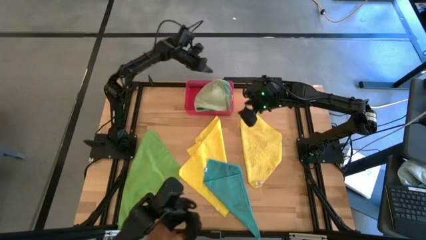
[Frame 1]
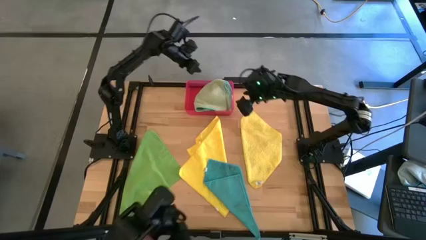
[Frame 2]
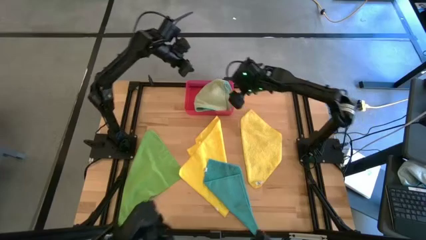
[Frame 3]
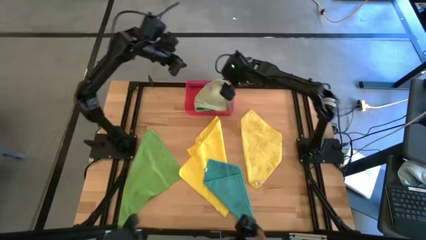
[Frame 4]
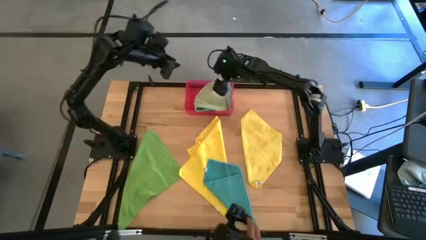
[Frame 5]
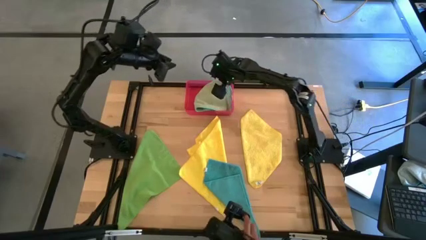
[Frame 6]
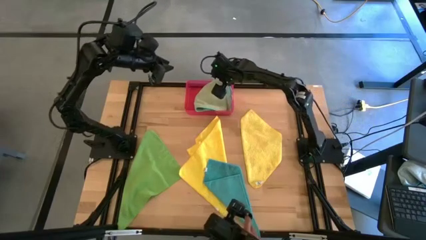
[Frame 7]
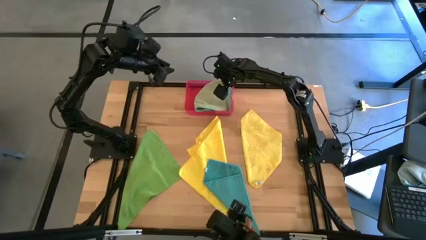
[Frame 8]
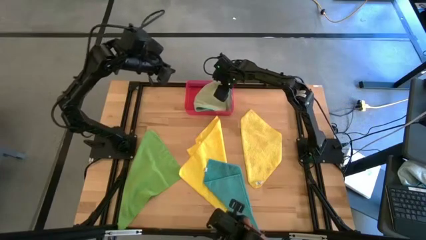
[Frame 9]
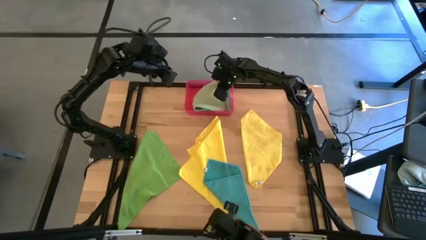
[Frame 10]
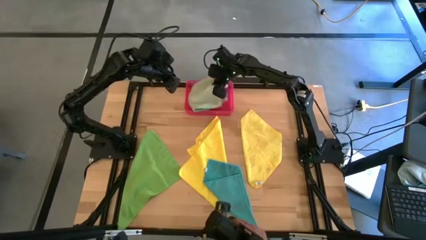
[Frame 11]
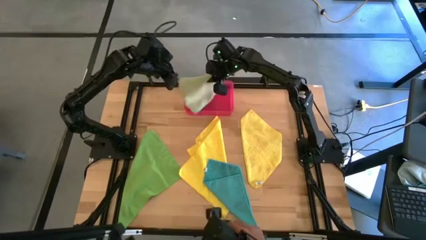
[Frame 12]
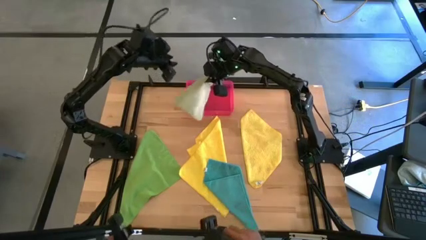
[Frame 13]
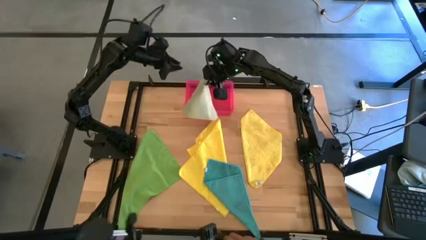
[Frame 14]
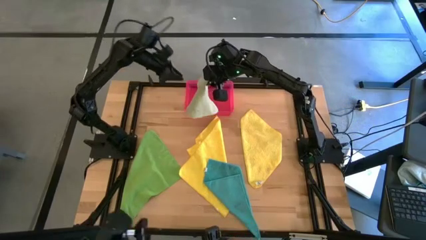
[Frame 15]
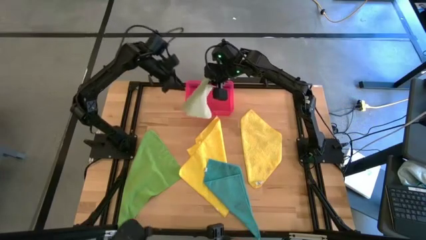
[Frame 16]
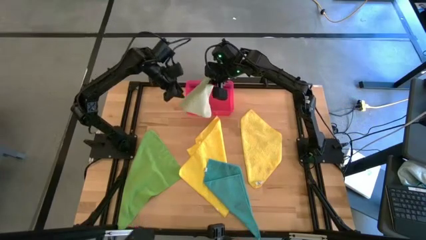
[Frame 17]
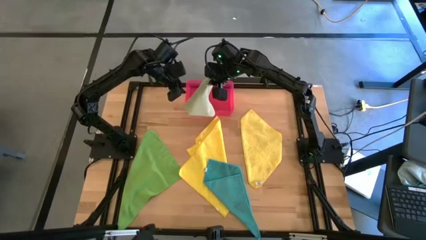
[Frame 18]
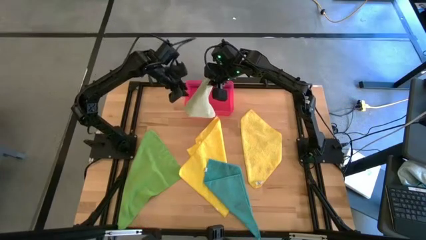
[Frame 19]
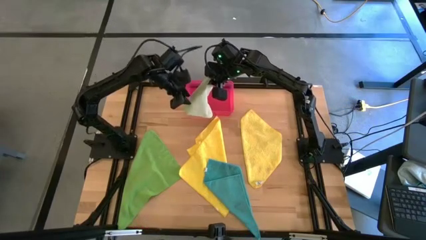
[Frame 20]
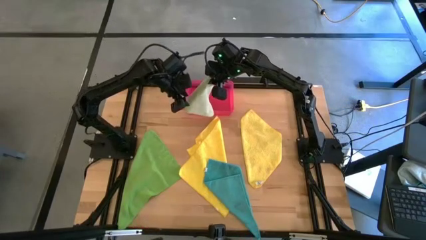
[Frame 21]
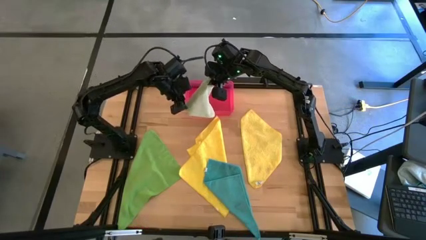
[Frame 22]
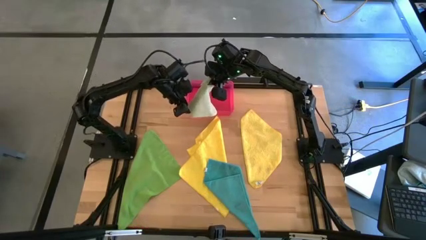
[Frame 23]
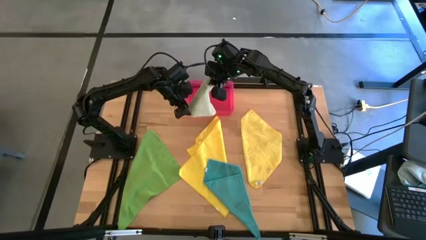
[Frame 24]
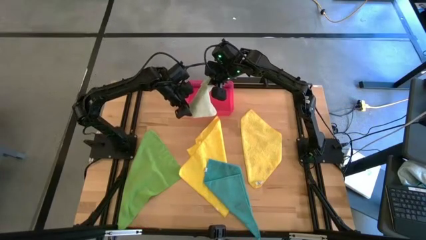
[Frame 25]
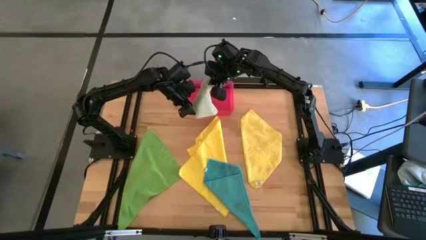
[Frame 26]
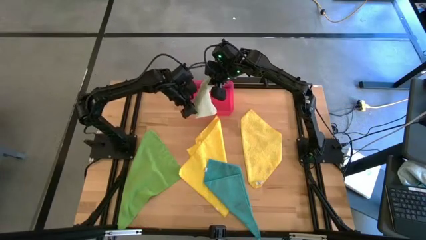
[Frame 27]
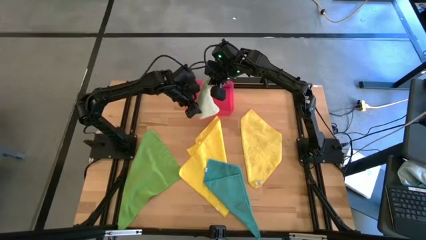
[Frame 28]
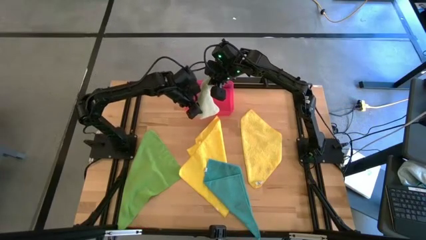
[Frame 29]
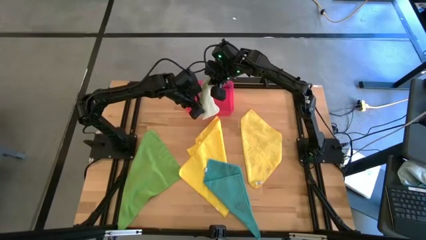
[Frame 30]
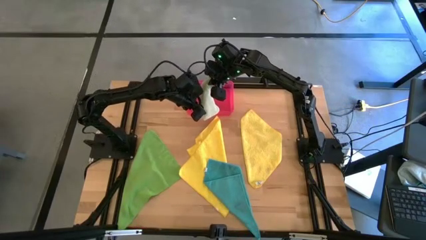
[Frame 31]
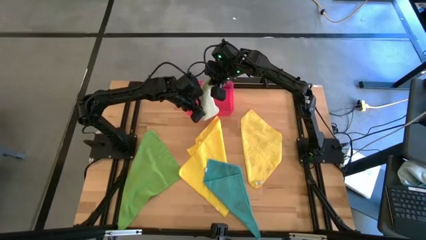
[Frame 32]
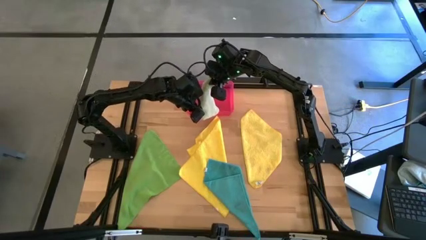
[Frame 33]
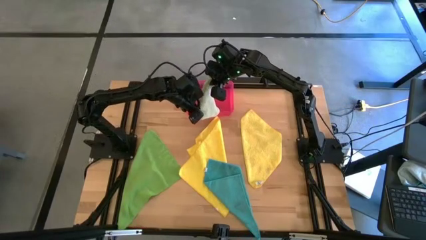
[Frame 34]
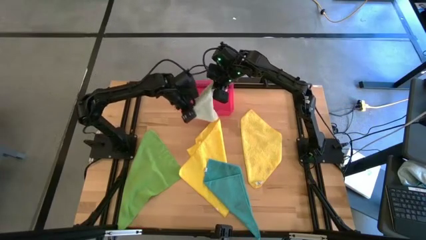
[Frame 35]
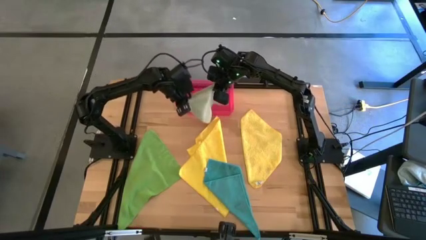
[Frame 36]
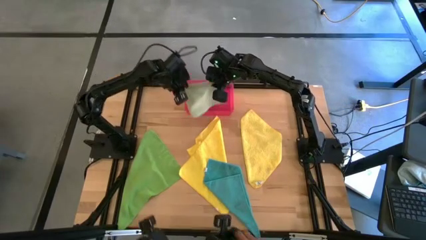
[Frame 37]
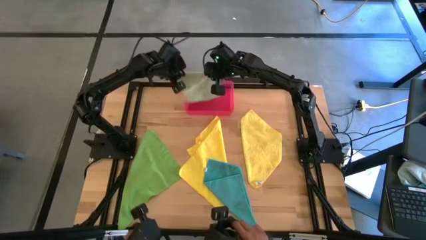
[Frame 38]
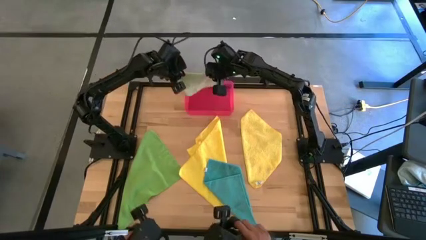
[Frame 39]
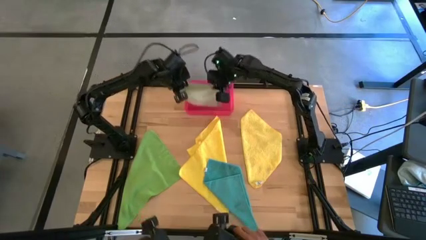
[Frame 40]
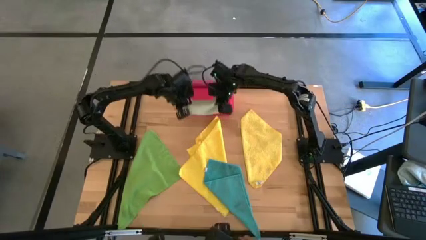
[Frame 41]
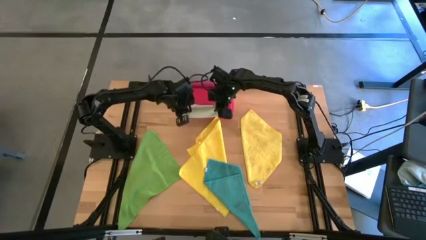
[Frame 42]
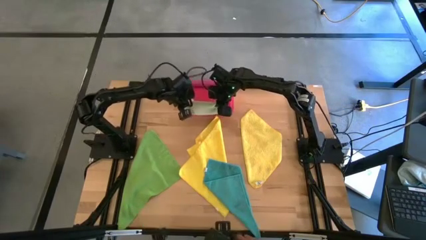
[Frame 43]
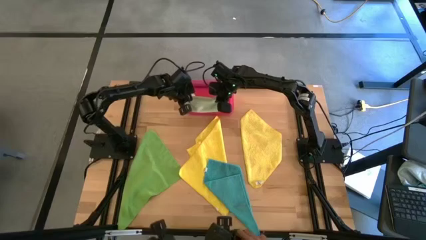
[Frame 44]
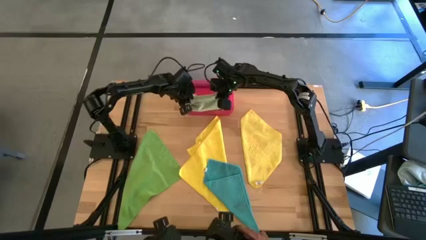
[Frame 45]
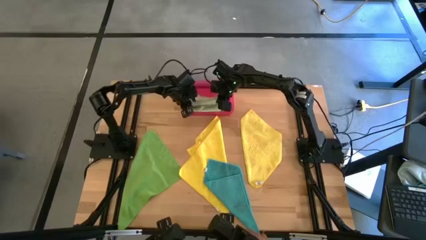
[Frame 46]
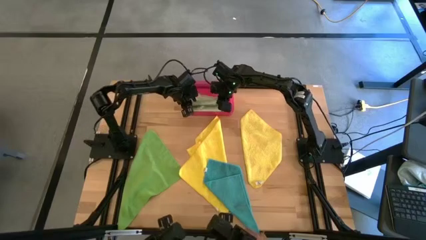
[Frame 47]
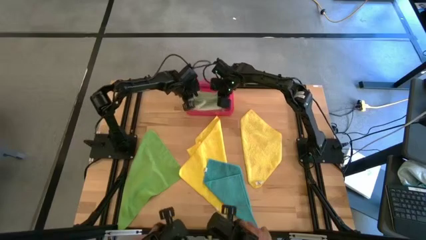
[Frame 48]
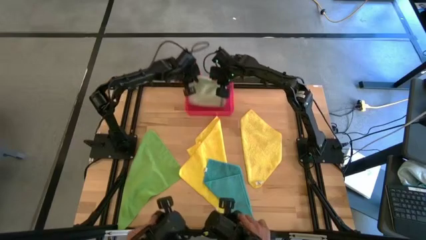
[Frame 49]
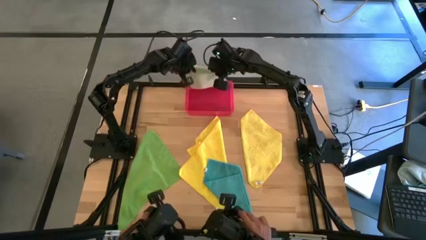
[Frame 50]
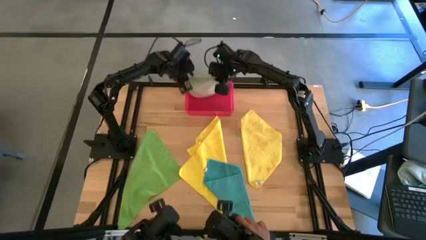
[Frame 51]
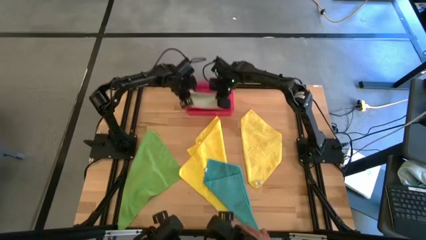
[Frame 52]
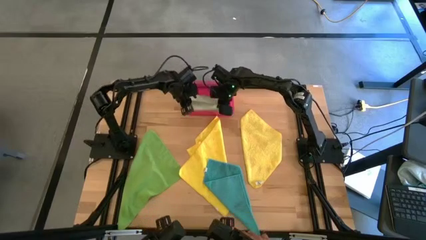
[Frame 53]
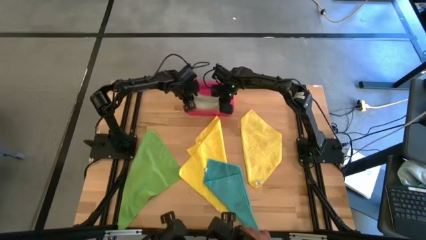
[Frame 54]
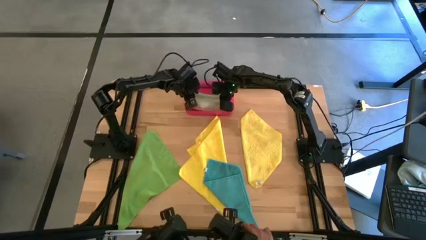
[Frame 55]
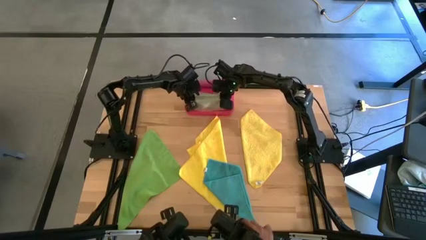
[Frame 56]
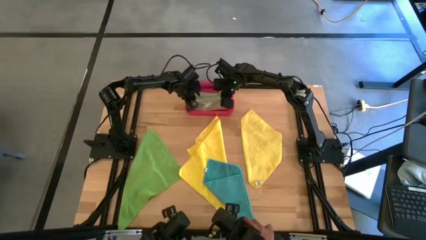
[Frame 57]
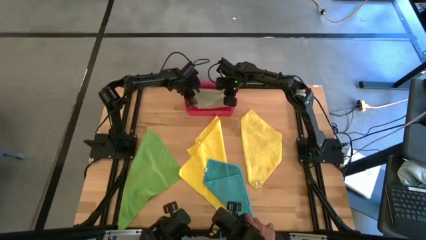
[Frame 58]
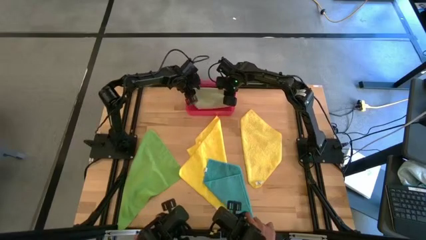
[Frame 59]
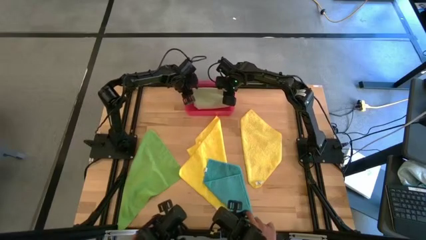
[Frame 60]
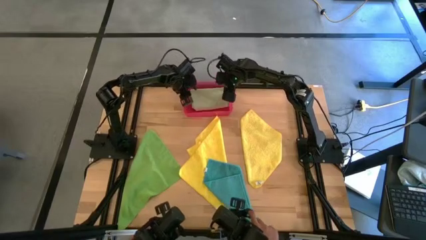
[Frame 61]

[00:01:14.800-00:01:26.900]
Task: Fold microfiber towels
Put the folded light green microfiber cloth into the red bin

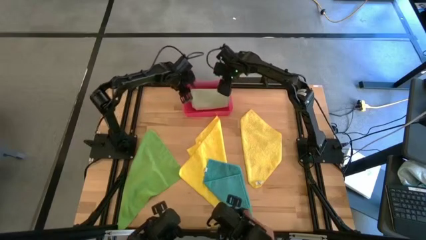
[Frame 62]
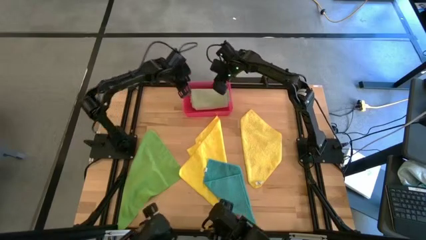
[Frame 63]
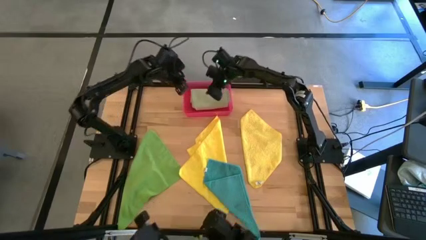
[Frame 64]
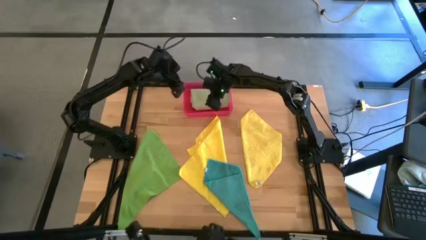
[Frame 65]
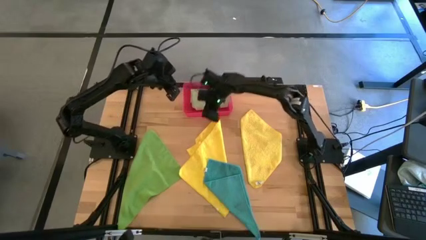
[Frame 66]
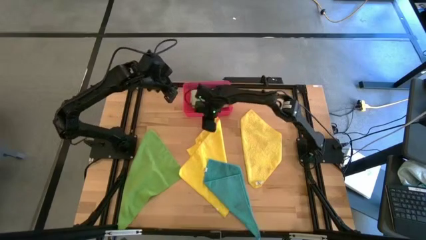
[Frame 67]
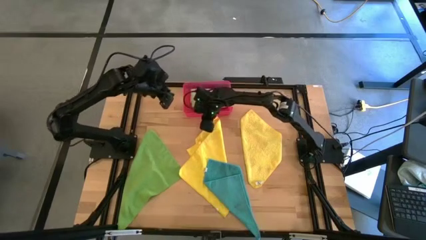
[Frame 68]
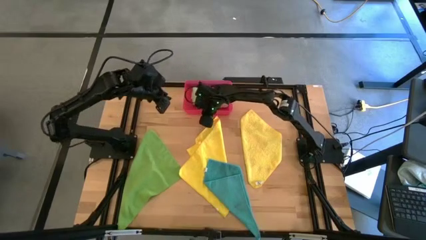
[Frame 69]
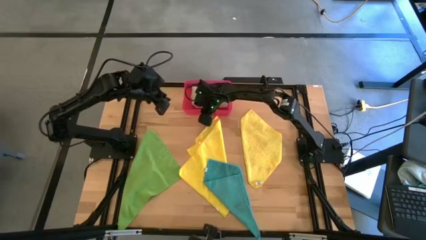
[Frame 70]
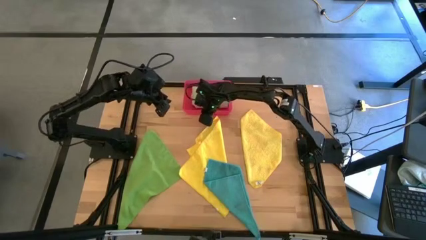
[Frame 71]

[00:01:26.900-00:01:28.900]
Adjust the red bin

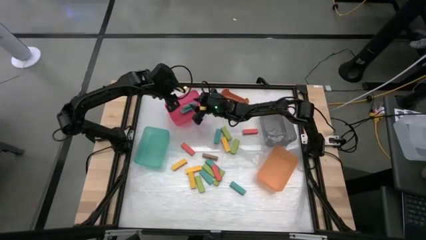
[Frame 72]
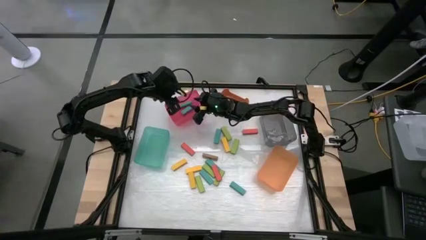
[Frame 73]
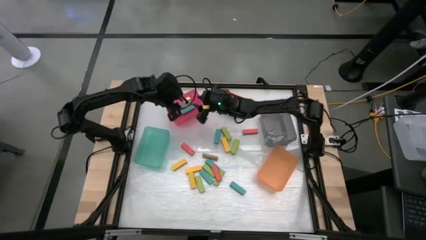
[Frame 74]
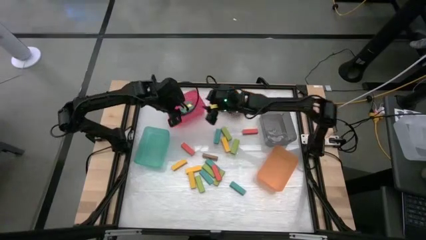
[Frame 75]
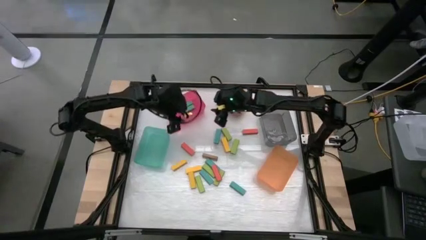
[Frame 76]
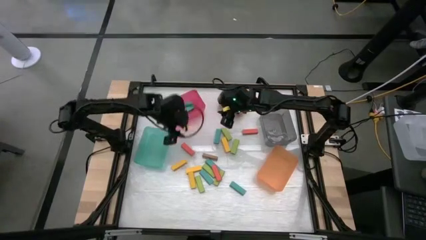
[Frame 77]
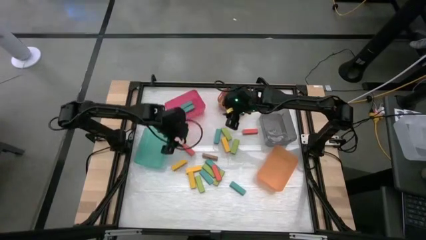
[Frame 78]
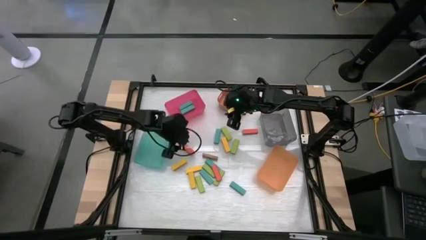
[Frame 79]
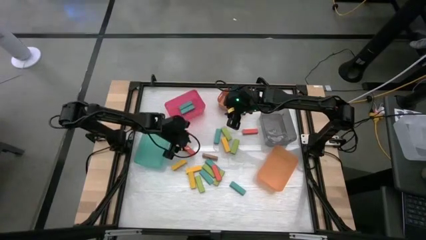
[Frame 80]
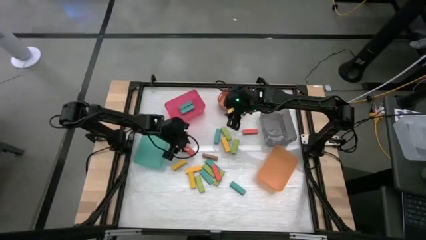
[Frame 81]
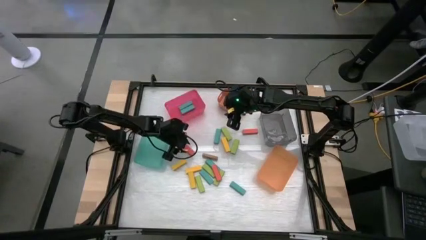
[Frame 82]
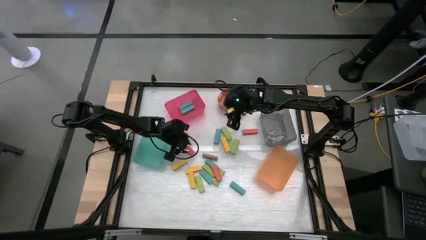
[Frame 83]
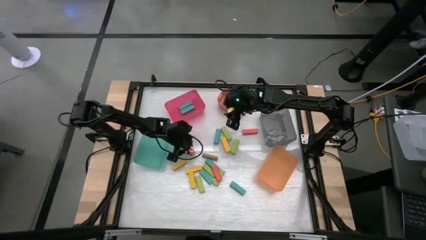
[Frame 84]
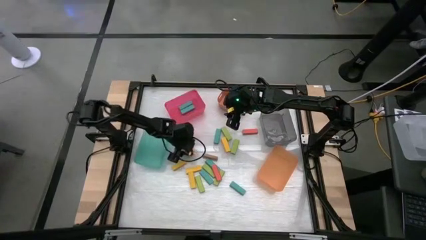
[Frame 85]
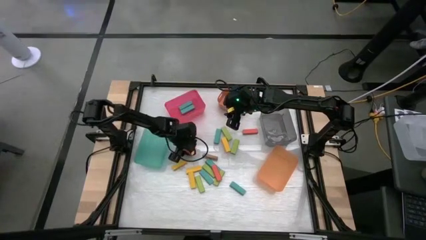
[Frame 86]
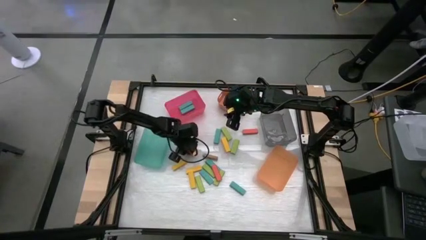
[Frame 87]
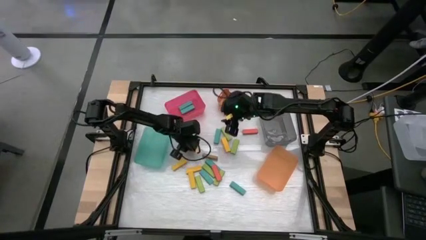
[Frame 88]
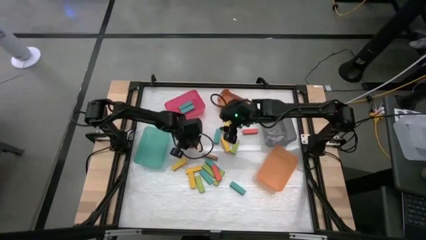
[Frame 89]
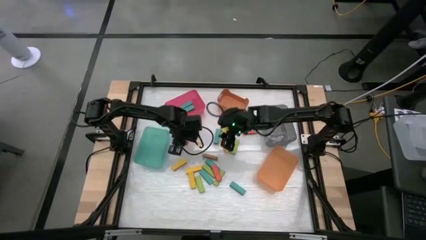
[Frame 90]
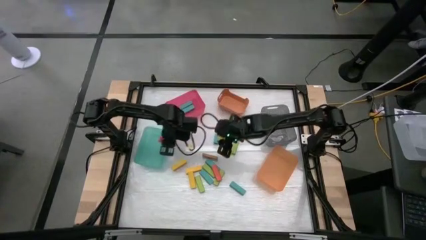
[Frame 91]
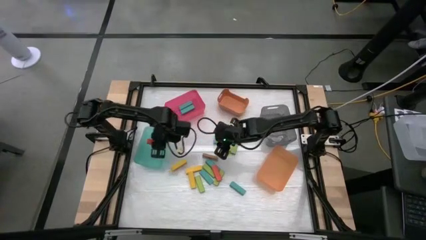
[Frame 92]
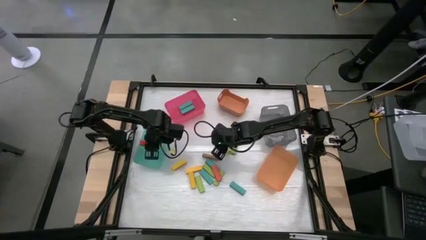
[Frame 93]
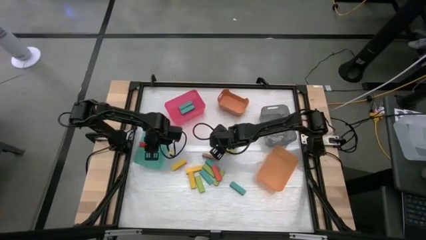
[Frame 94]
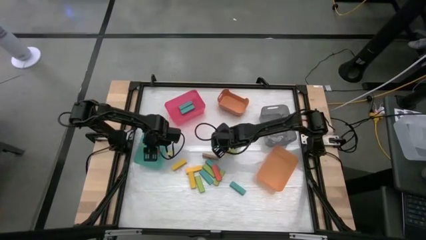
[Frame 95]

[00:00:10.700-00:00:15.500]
Task: Sort blocks
Put the orange block into the blue bin
